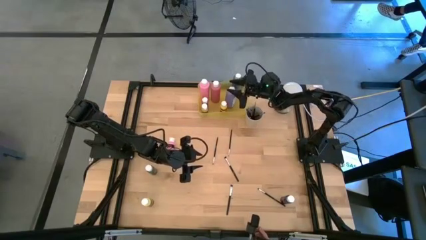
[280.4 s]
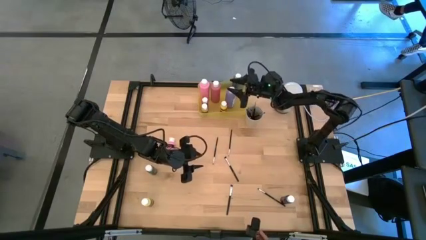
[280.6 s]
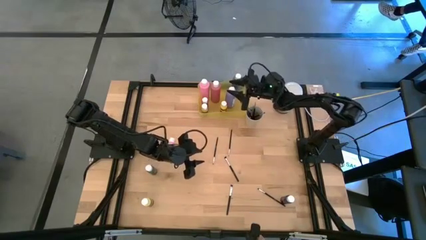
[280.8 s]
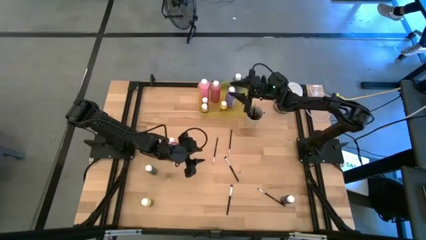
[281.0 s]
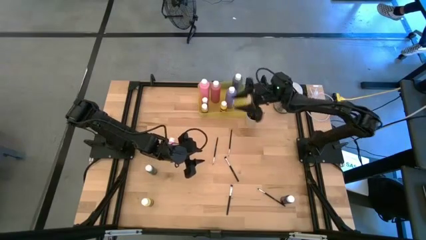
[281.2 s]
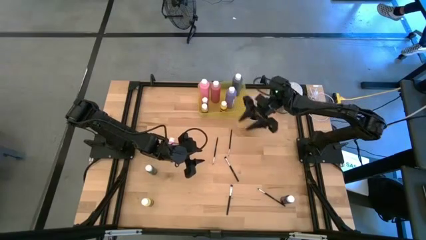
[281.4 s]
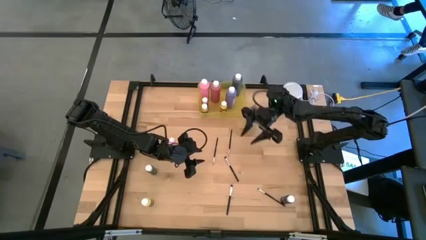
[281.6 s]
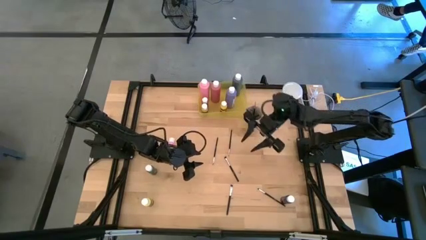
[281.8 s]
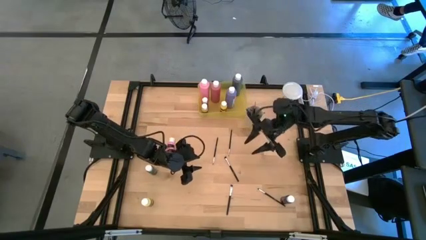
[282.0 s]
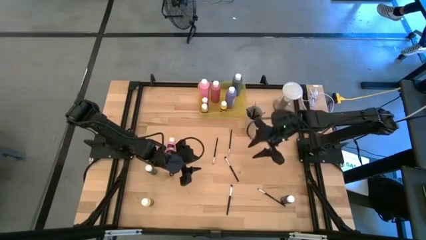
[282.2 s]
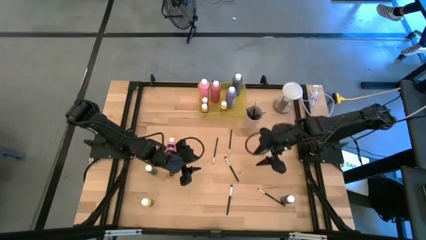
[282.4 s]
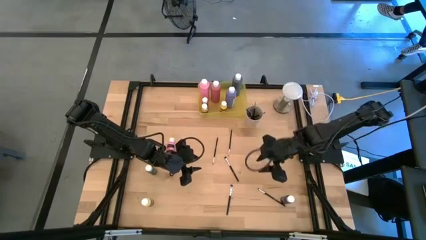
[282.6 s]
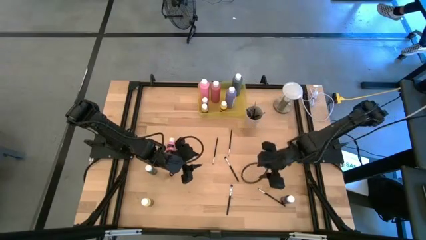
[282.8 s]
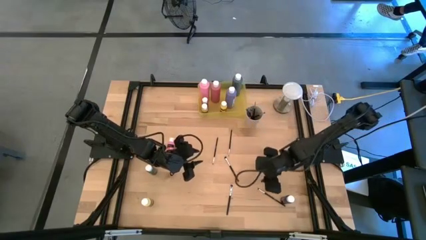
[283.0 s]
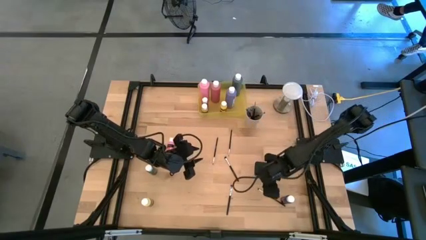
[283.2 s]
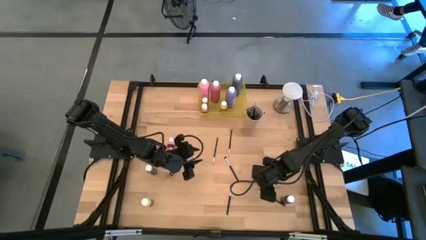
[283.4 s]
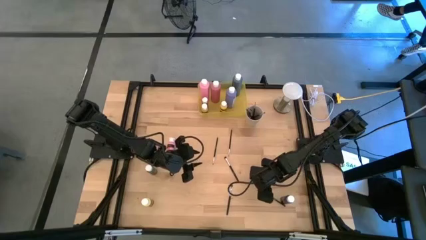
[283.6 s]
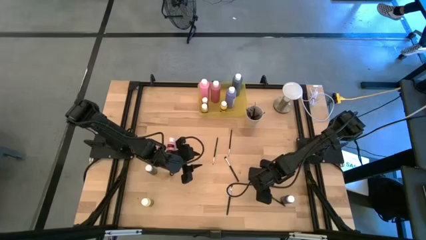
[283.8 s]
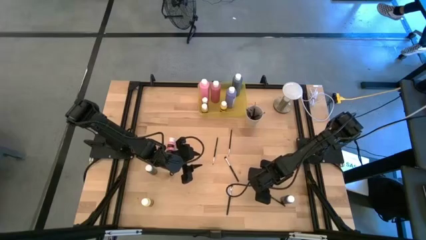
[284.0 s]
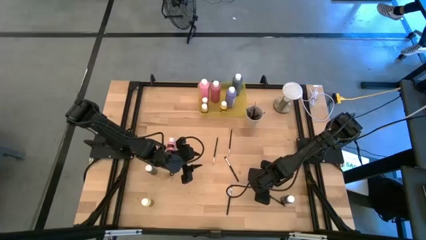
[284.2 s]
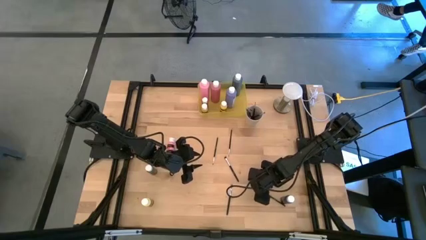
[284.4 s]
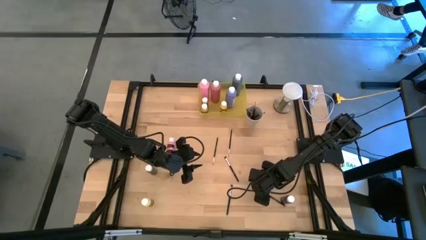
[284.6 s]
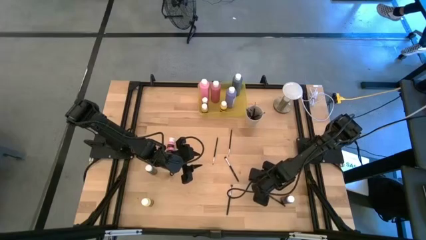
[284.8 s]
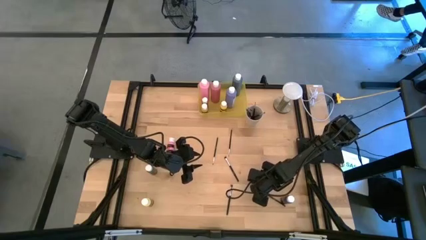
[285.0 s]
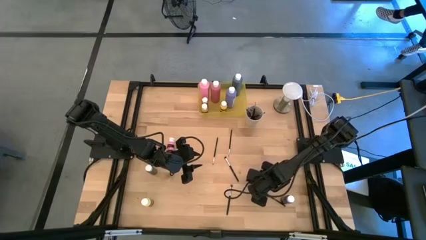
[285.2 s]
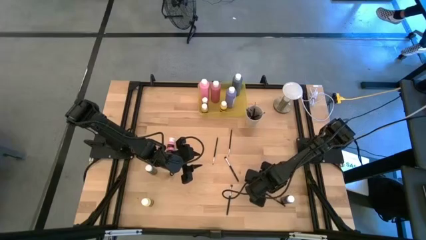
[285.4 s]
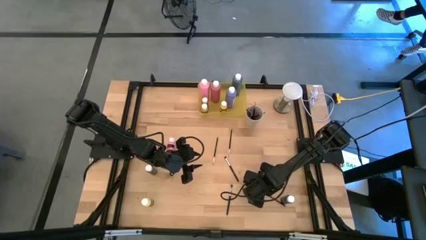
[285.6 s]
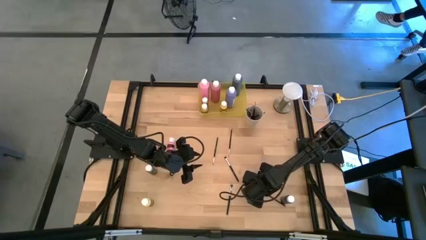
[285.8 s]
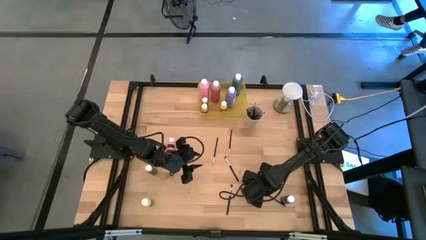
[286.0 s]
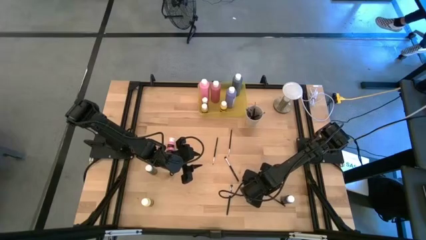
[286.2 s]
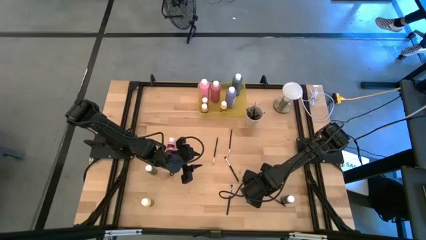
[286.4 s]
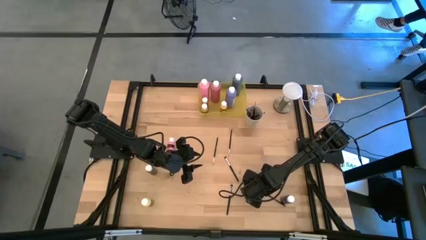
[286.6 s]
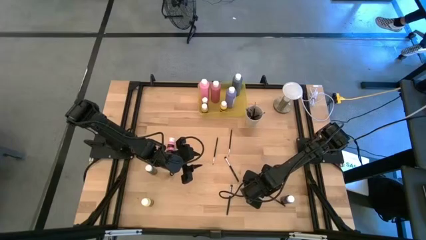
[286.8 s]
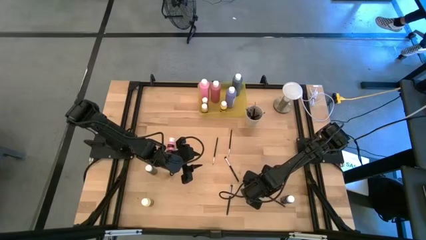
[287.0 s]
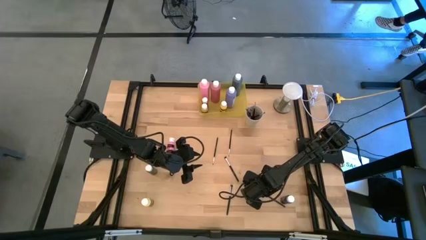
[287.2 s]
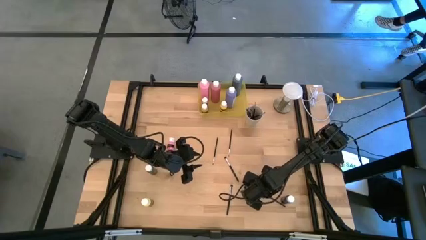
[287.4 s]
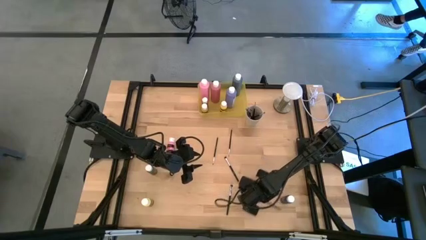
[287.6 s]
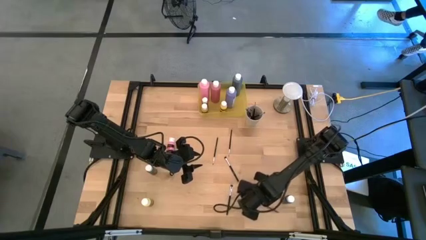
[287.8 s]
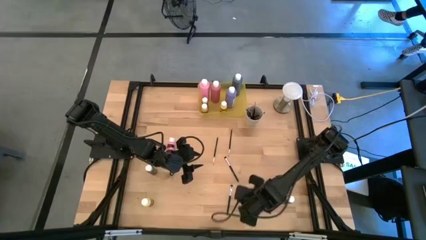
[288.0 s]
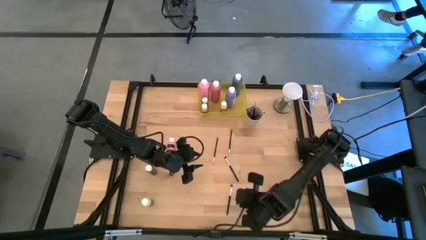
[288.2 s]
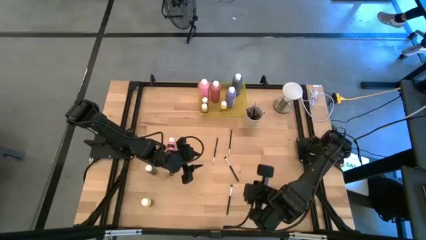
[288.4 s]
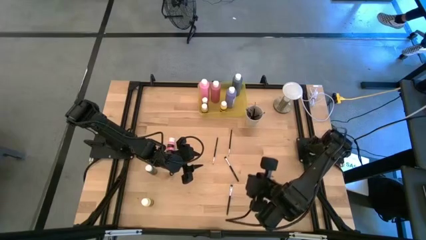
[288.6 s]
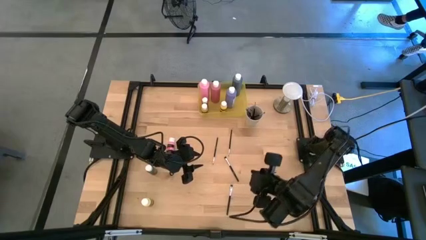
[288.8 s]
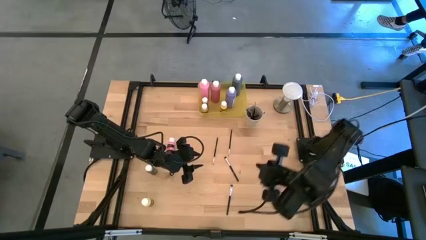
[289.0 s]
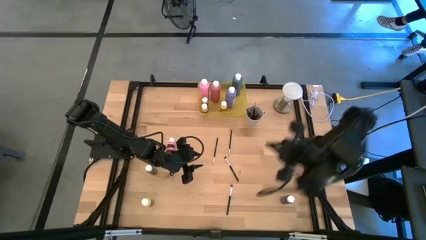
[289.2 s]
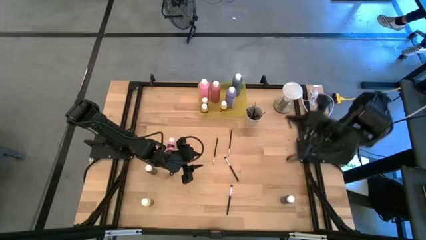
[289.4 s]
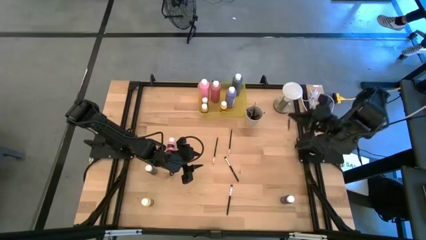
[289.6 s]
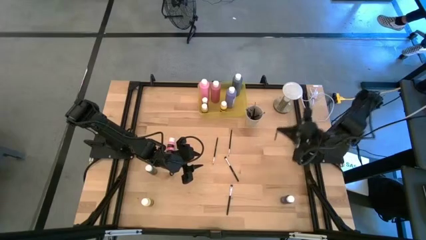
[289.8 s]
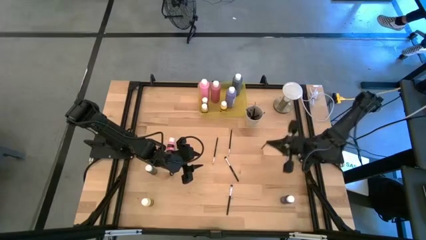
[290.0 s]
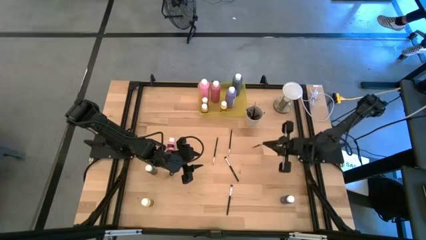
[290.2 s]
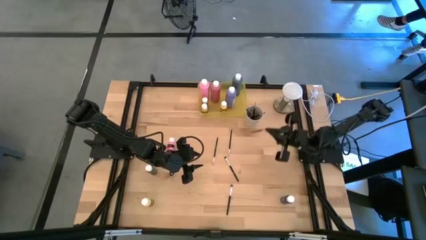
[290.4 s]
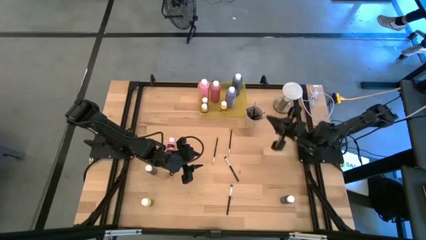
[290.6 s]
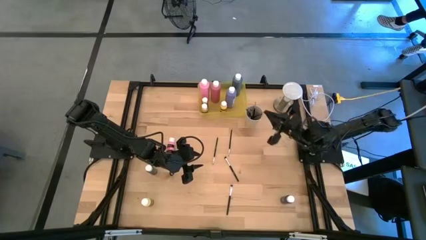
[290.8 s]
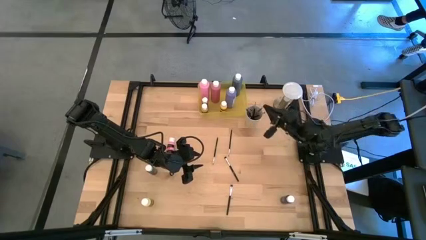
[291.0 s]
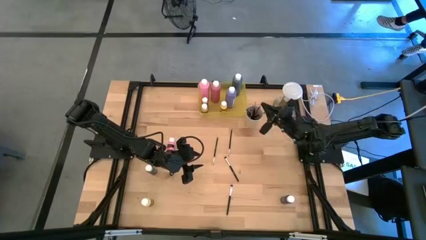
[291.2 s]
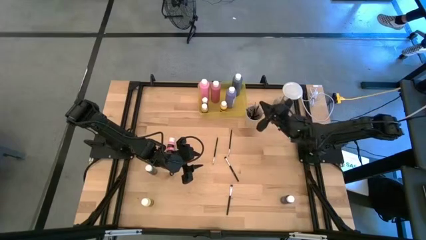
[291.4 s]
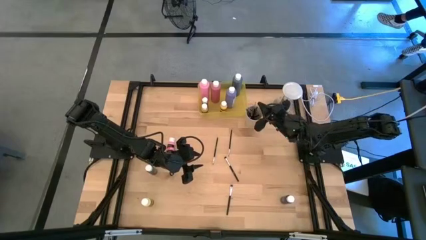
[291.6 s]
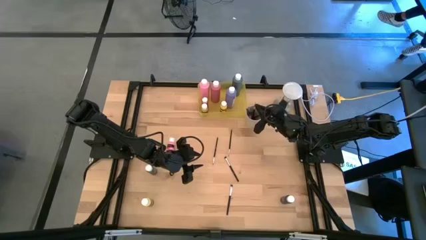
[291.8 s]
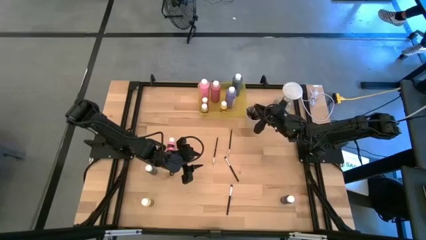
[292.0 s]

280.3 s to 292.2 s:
Task: Pick & Place Paint Supplies
Put the silver paint brush into the white cup

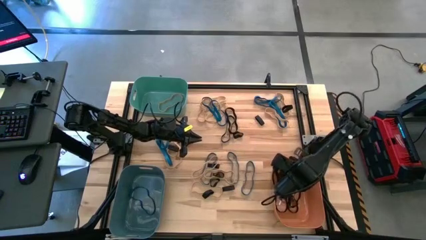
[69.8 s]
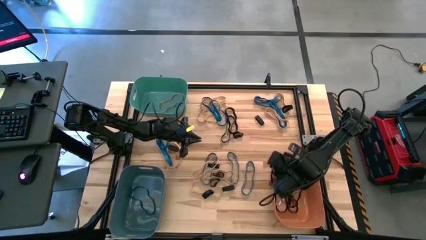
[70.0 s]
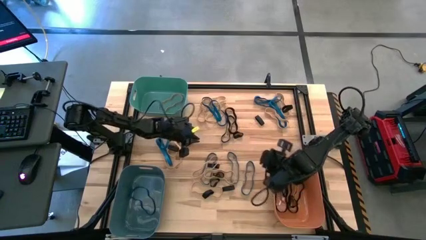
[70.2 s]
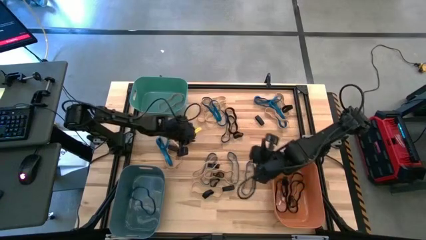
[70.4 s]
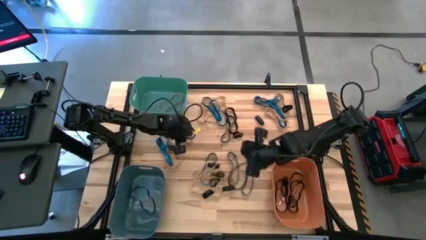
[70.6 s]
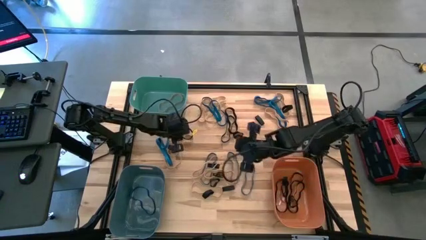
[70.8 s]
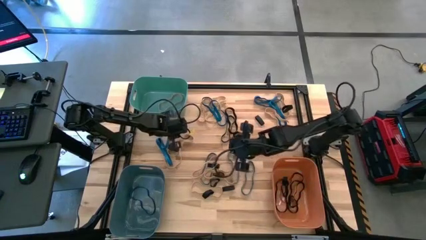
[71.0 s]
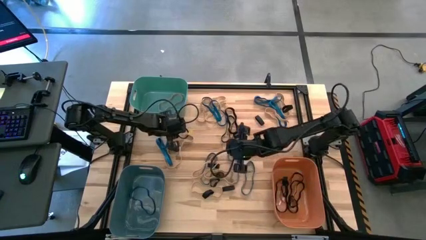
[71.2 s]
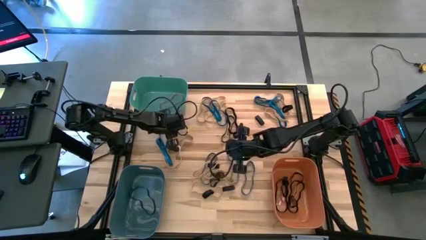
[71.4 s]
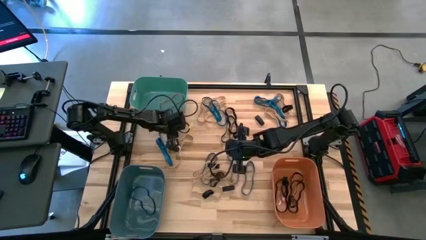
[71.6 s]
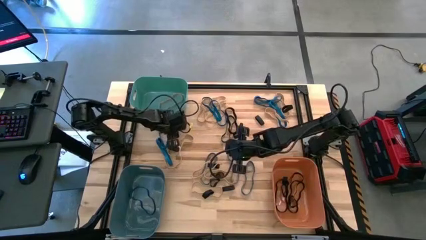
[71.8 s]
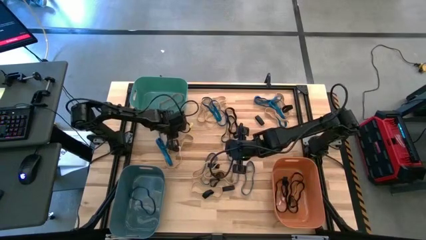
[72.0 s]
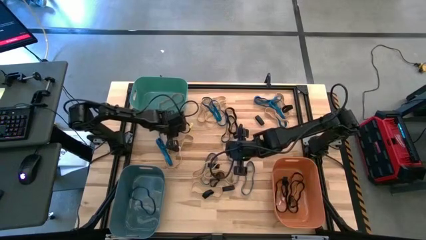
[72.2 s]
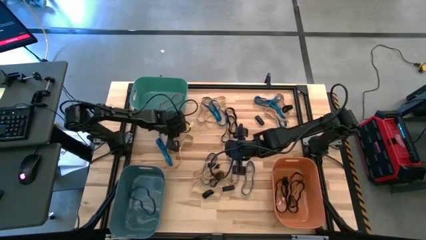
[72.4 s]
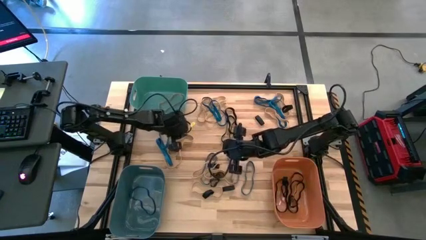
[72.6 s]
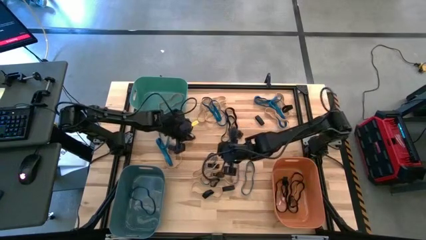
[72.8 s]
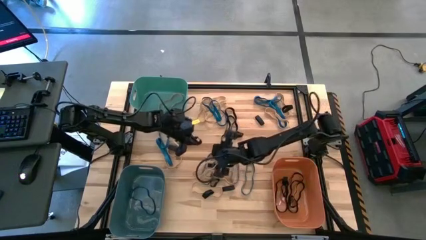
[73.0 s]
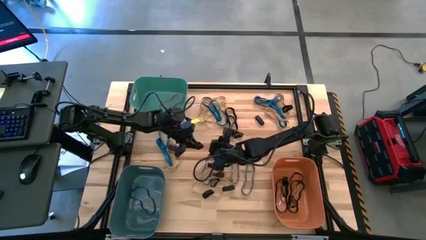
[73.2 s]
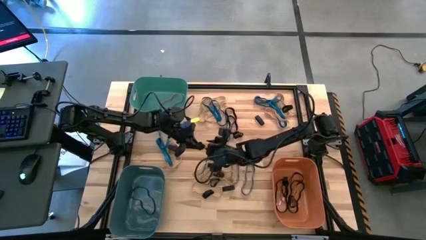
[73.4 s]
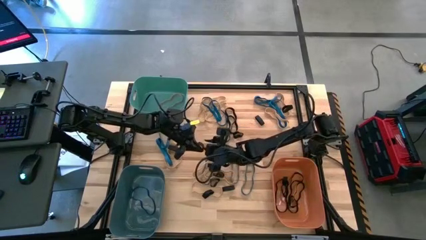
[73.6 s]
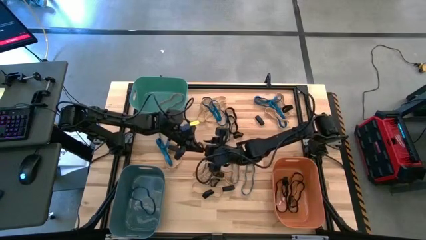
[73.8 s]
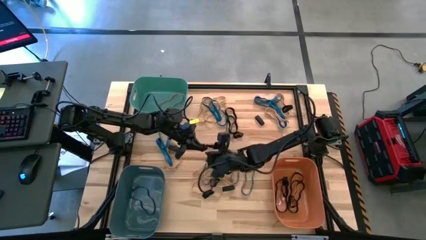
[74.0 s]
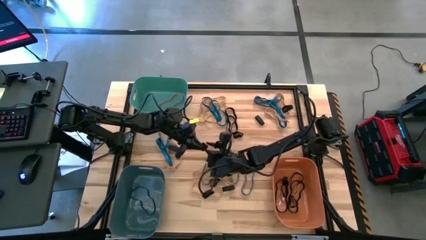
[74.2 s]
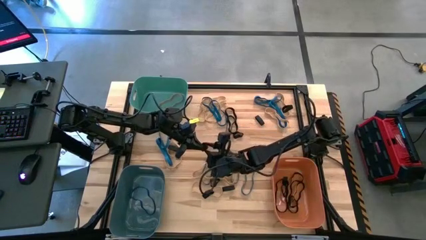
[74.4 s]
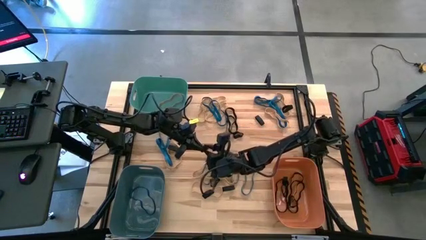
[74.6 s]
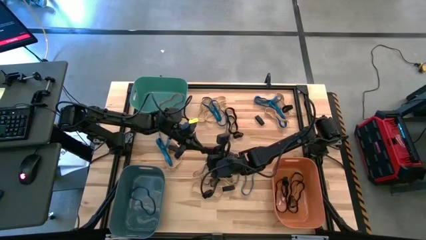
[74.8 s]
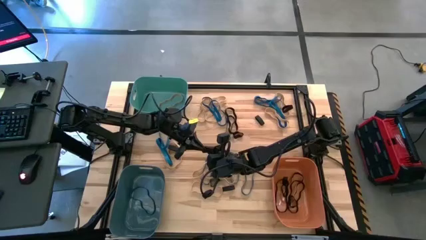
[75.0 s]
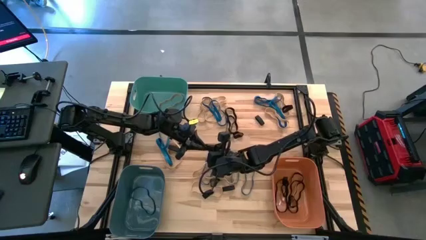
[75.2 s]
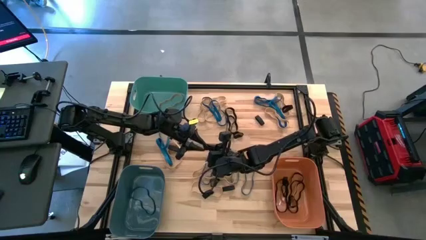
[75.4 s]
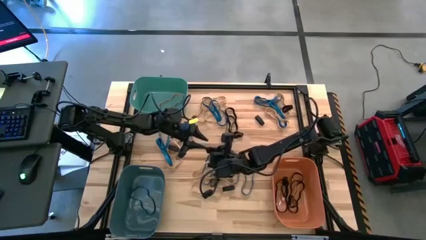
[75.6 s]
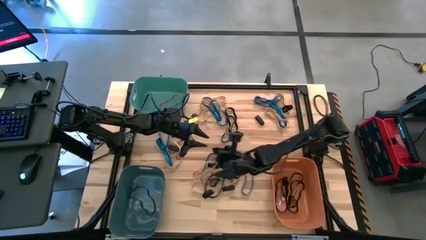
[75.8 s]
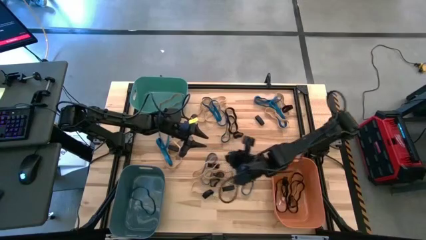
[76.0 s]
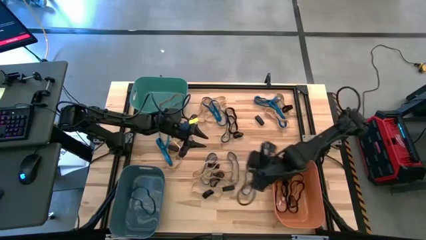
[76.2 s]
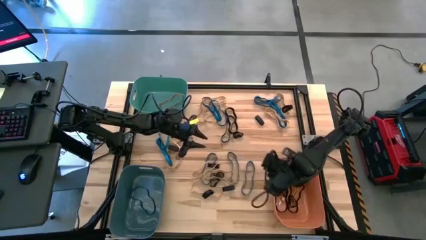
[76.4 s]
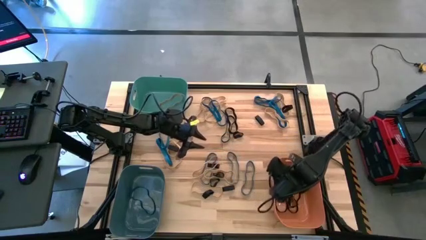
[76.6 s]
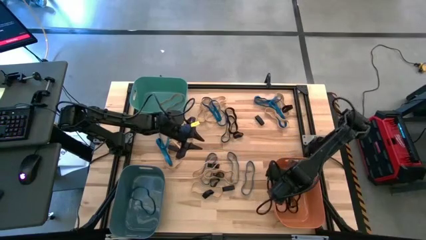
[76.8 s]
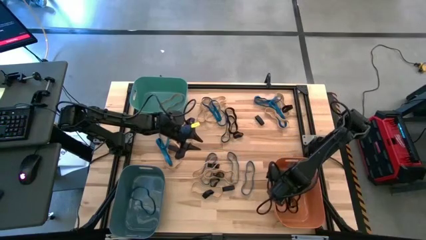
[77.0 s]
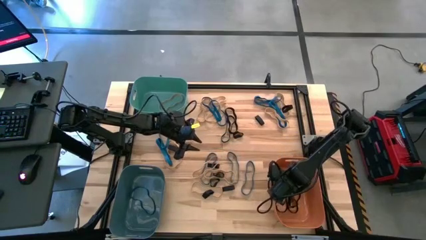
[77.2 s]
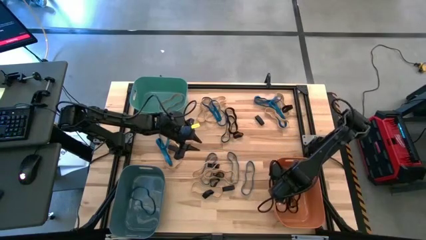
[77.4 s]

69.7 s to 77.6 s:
Task: Sort rubber bands into baskets
Put the black rubber band into the orange bin
